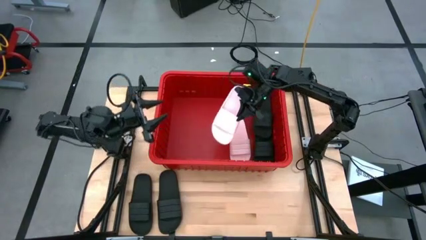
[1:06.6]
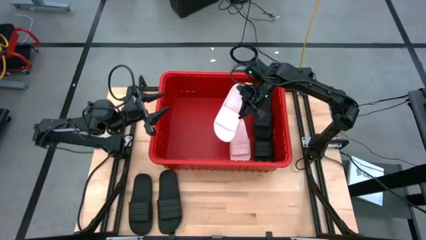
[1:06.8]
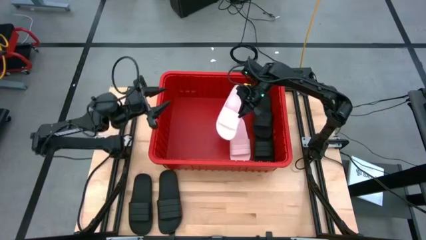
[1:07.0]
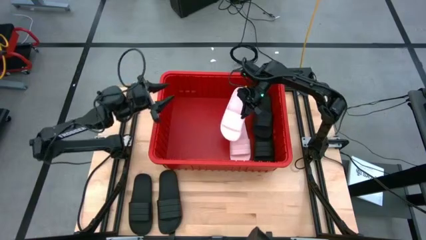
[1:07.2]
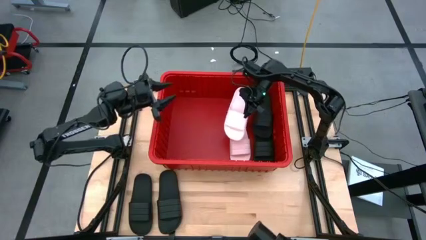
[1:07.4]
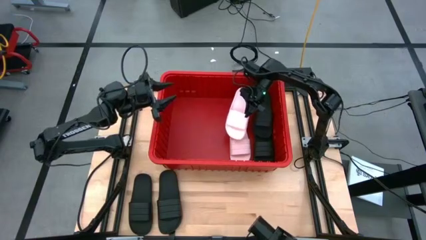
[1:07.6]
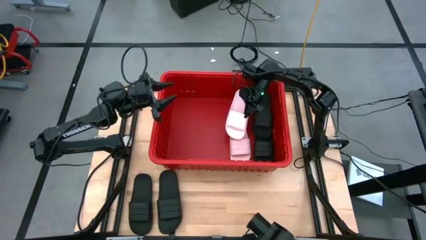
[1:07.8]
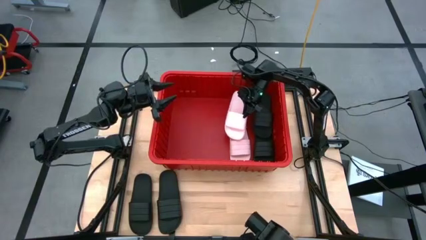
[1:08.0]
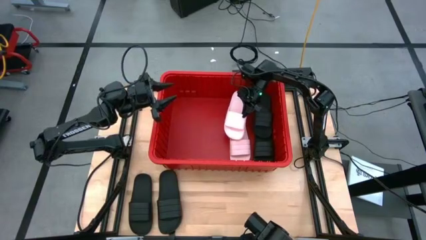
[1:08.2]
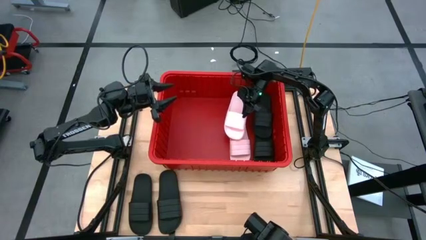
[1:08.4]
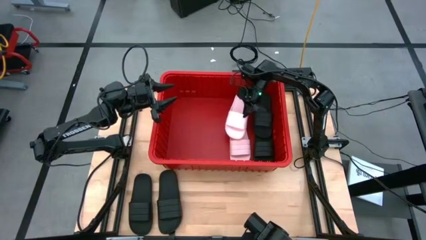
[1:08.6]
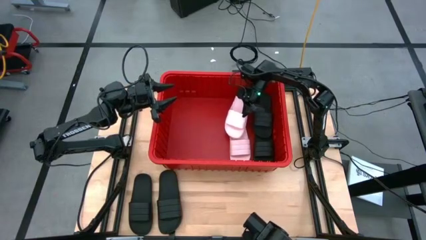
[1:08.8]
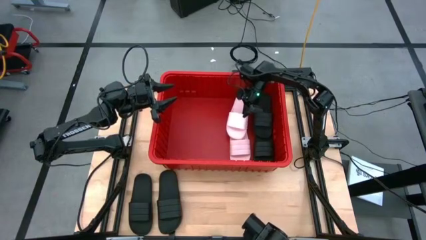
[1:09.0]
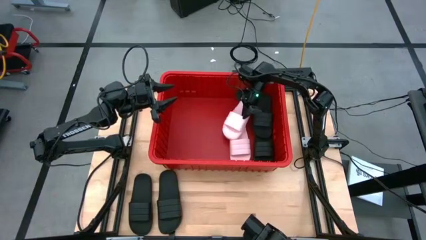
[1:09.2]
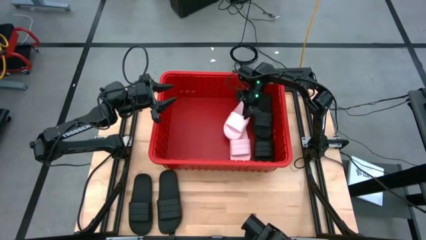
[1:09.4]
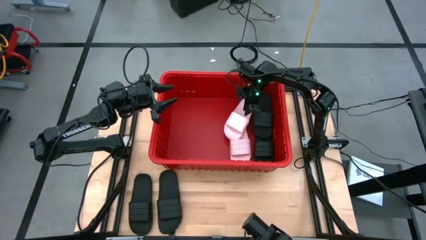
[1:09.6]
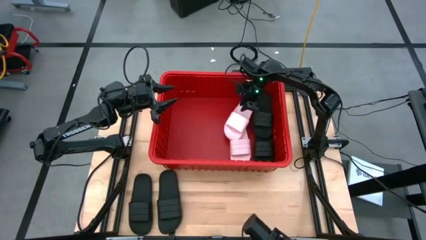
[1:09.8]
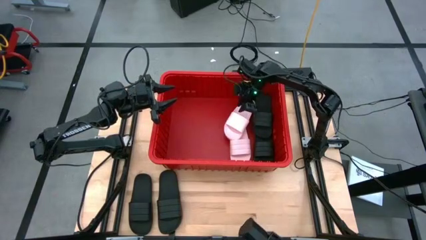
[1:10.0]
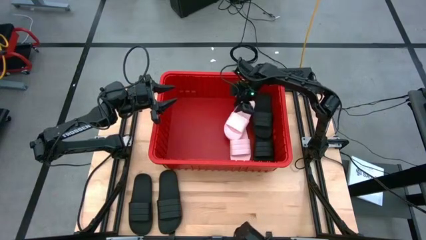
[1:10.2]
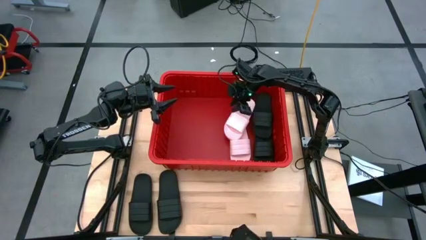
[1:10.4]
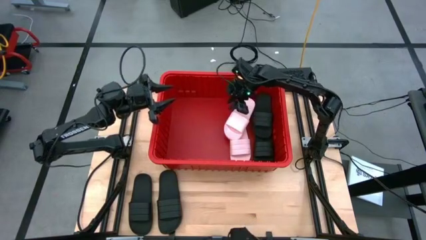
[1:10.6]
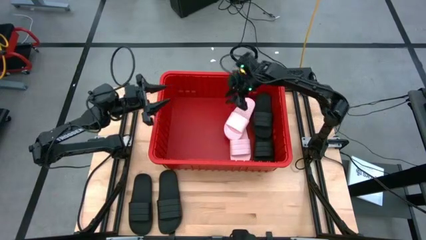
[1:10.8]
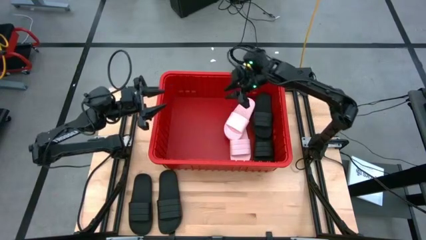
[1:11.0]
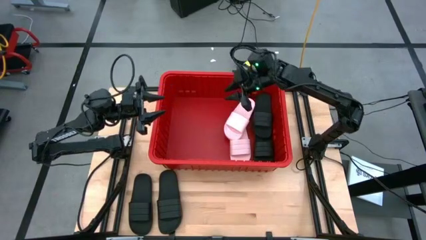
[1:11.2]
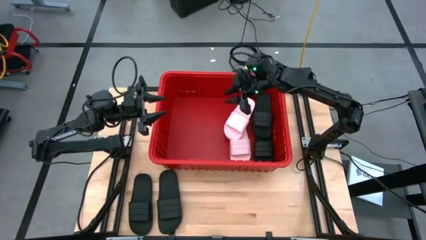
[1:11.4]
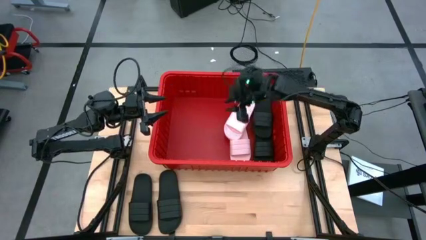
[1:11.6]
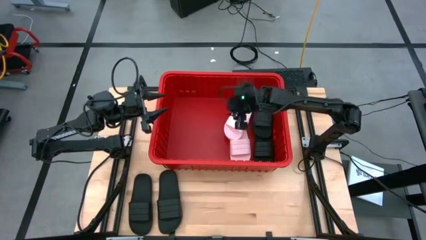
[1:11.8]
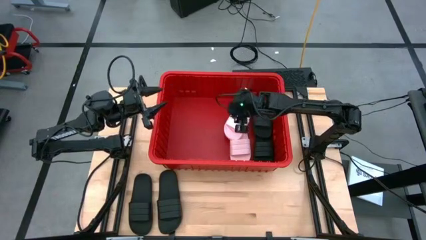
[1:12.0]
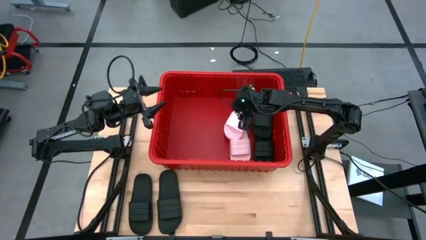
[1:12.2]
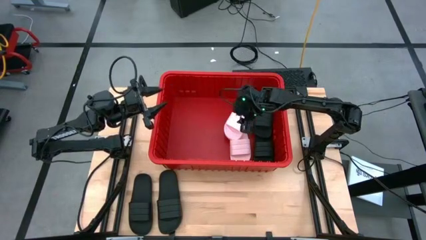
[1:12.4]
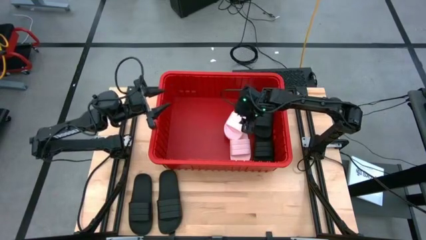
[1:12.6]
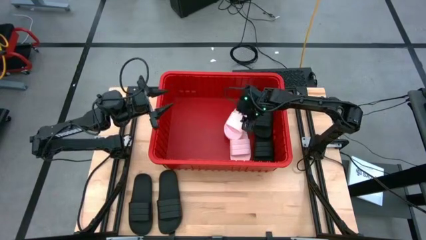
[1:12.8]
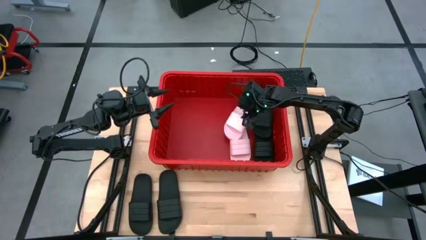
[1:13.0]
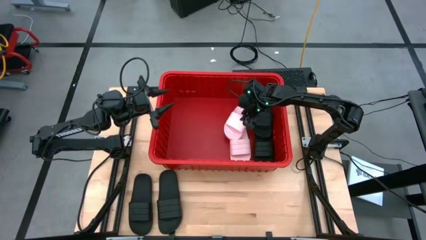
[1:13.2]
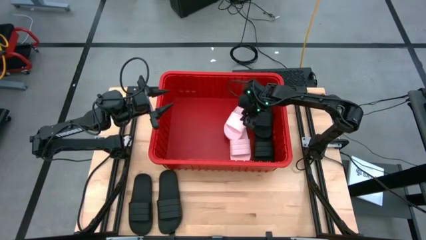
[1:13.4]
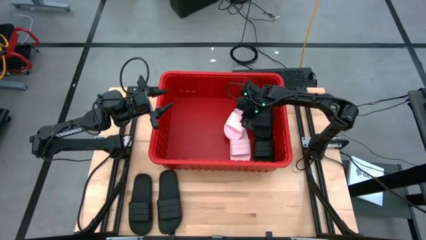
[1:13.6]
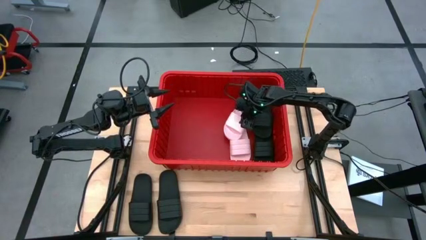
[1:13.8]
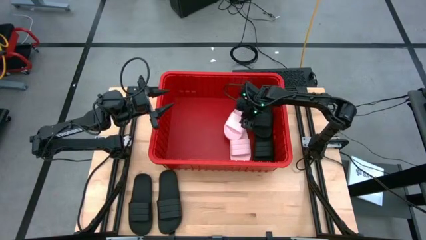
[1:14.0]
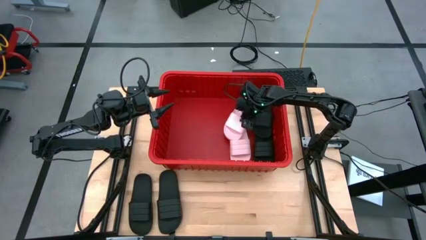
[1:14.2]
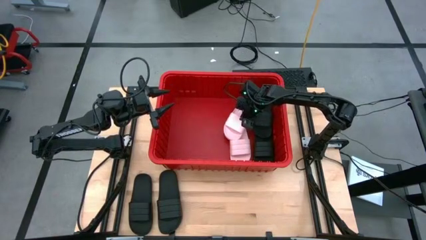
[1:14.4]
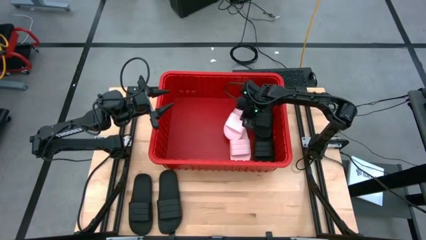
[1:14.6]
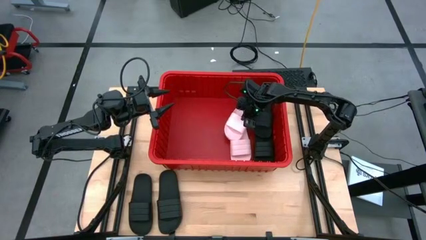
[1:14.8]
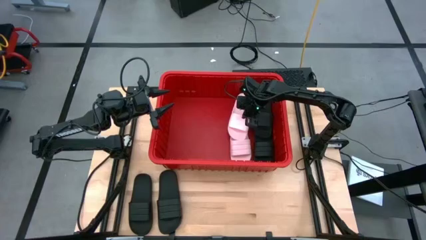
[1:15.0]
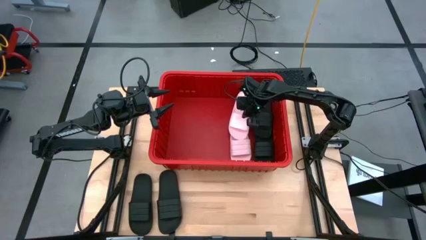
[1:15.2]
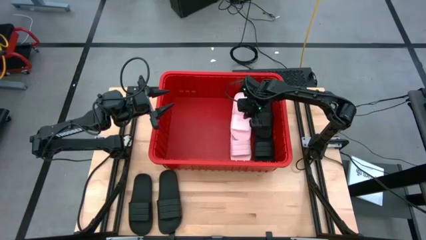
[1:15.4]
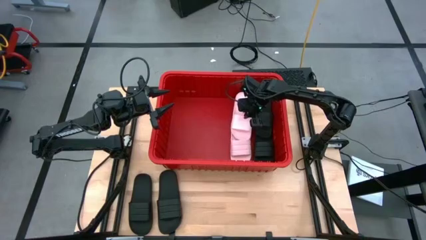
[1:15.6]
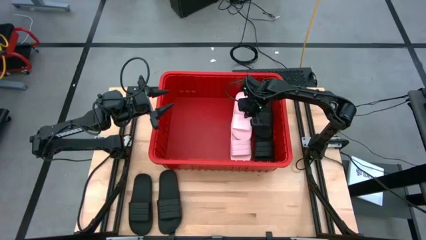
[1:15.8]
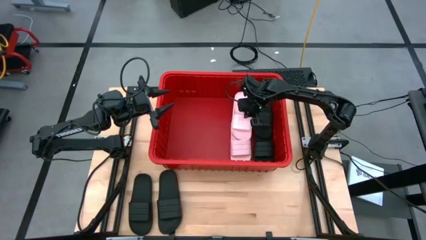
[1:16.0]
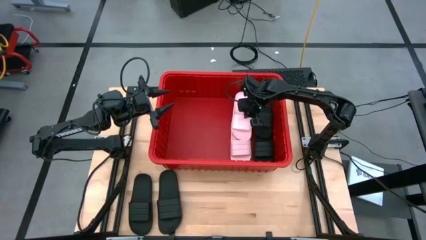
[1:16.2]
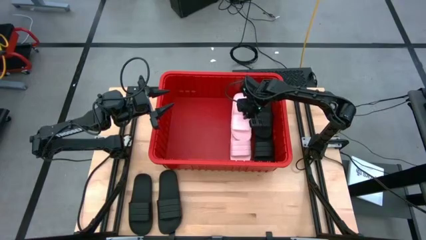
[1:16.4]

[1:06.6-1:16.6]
Task: Pick and place slides into bin
Put the pink slide into the red container

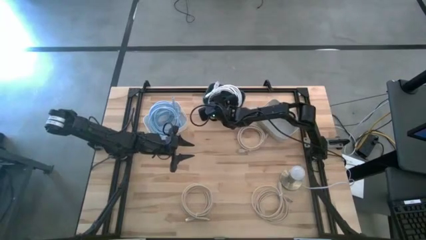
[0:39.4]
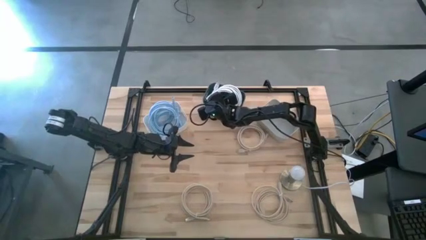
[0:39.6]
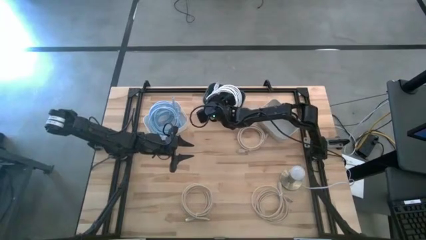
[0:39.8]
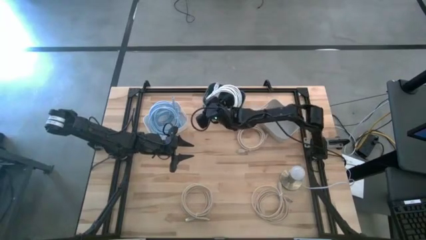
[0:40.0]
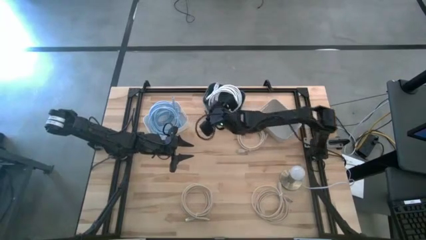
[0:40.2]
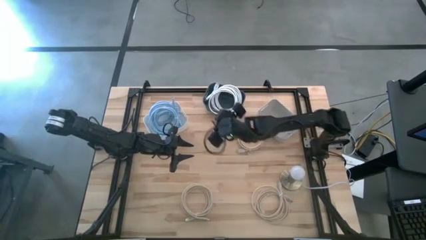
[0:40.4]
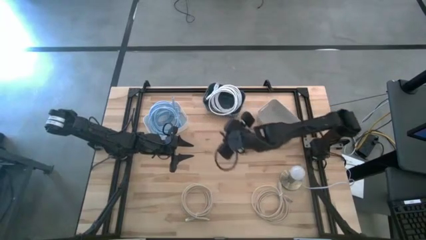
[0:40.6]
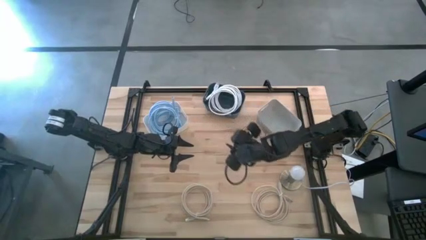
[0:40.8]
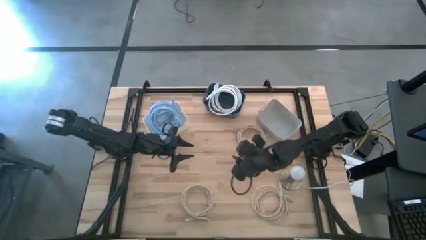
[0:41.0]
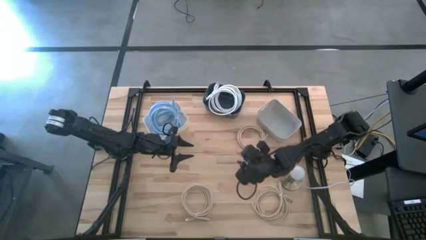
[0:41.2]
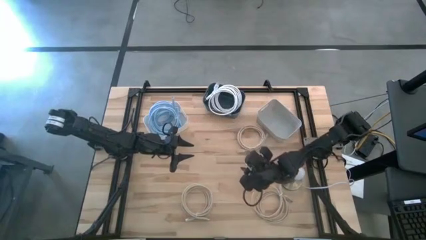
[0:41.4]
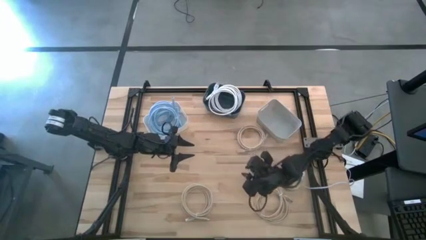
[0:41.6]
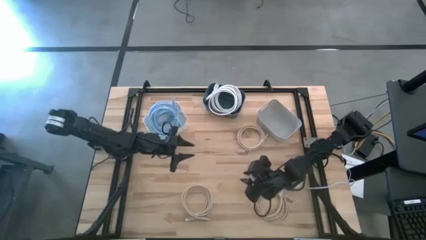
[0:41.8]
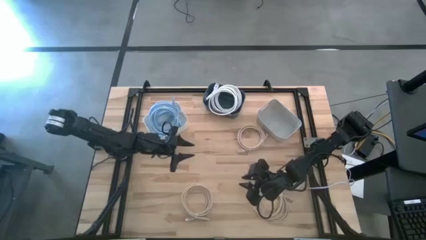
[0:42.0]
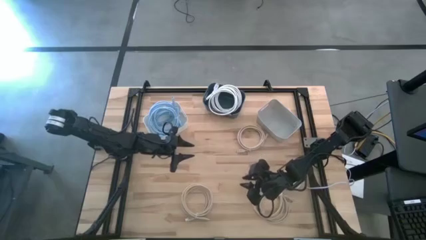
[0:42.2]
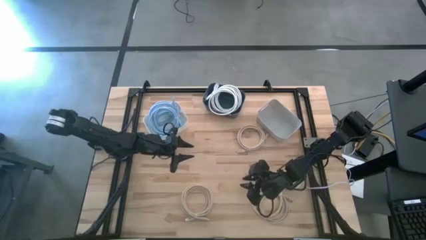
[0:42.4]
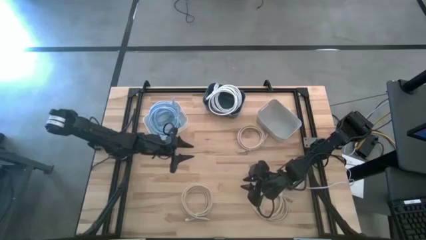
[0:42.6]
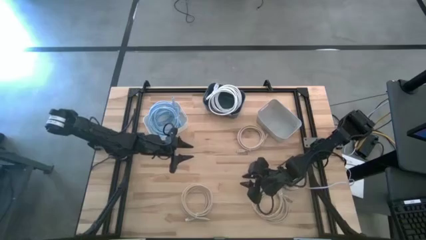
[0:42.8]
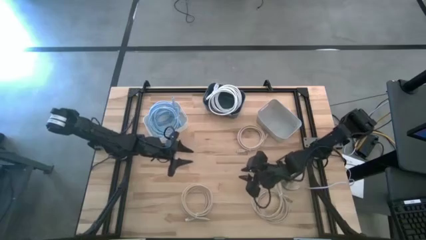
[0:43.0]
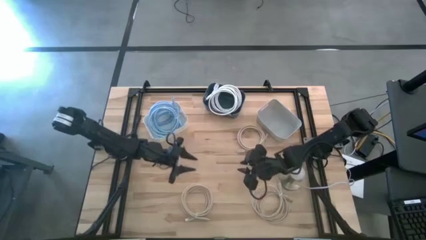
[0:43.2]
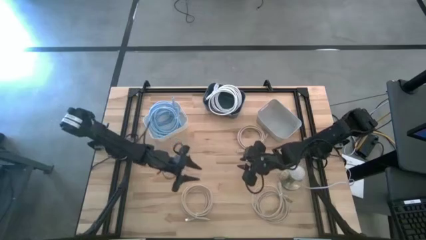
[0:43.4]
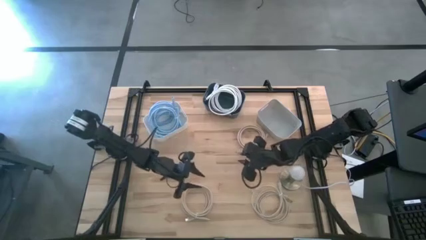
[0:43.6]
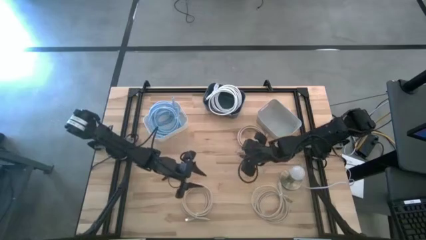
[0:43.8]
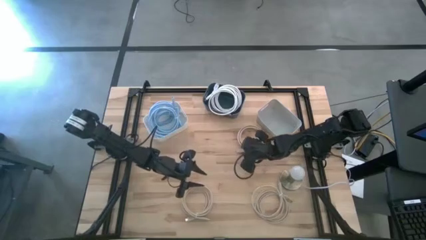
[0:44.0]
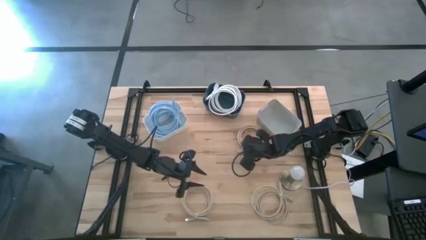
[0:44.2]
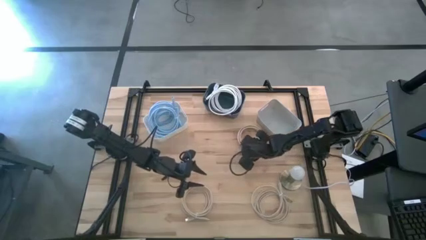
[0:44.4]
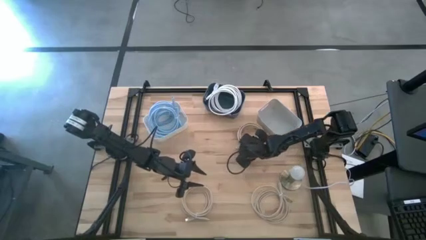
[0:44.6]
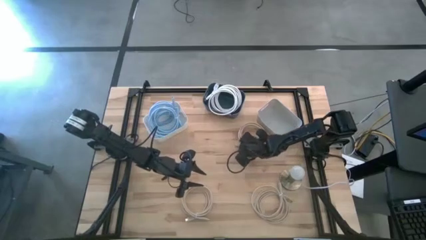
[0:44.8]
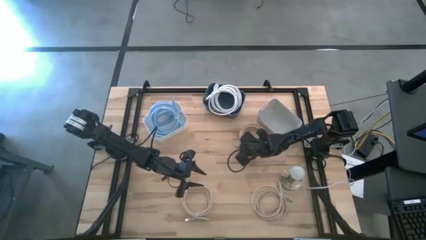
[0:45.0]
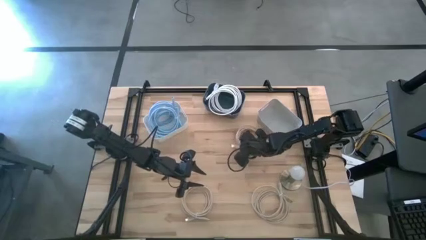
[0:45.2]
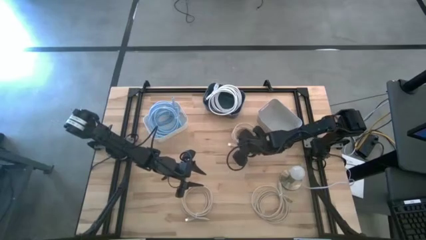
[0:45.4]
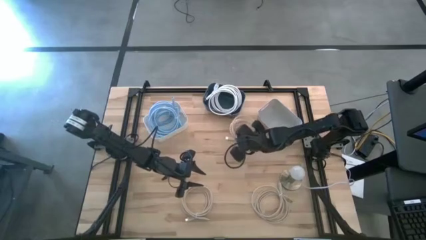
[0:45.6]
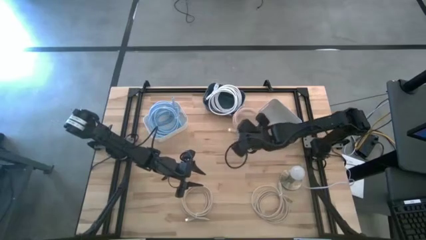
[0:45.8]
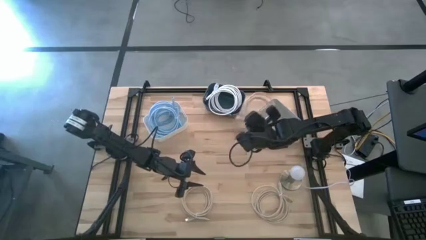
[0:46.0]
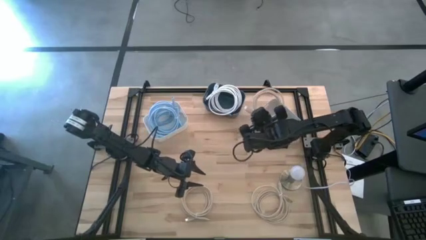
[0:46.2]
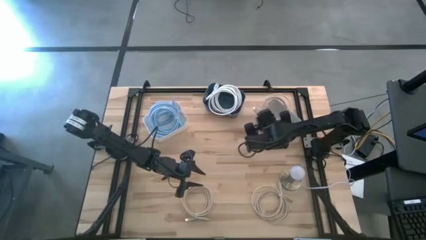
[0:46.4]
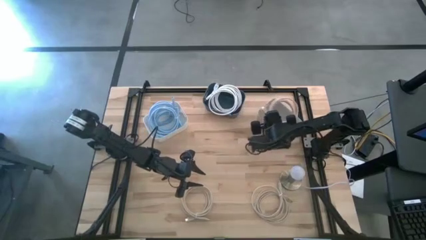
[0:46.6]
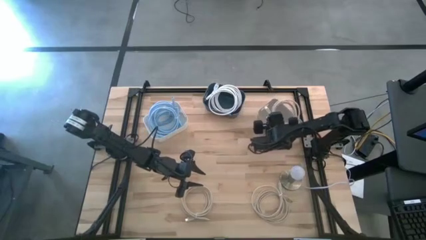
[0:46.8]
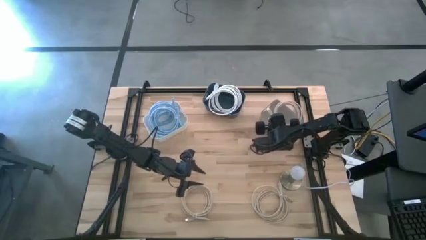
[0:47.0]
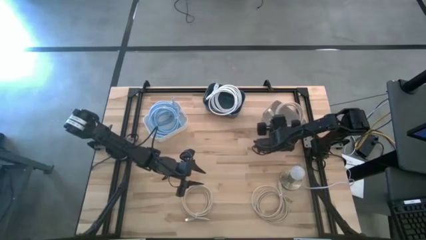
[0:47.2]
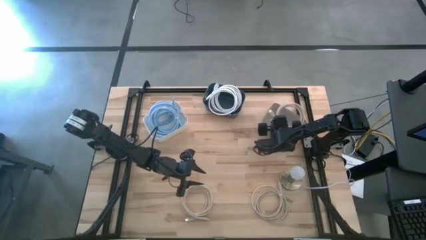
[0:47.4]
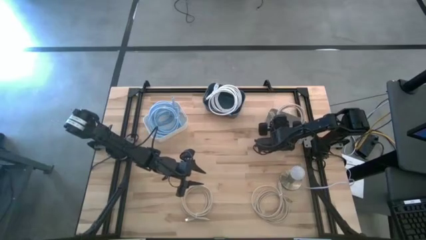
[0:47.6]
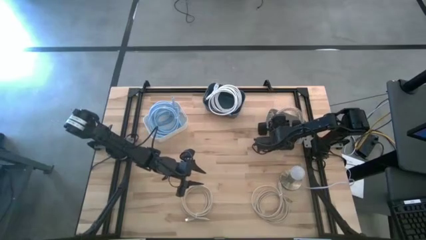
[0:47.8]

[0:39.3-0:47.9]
Task: Pick & Place USB Port
Put the top brown usb cable into the gray bin
